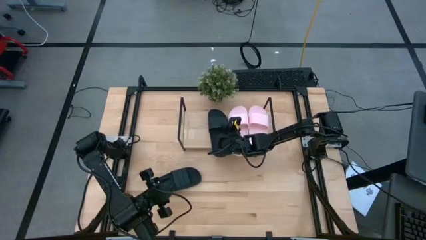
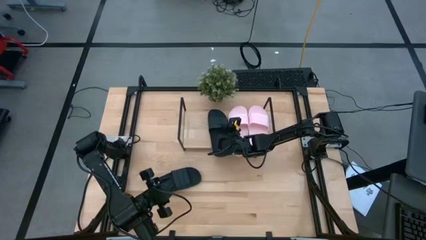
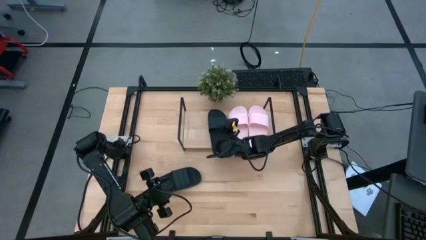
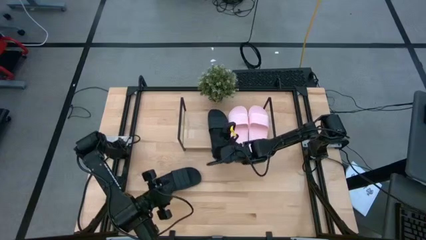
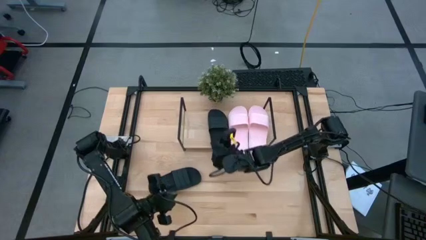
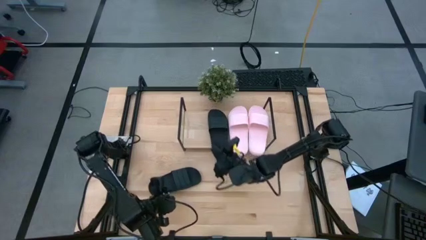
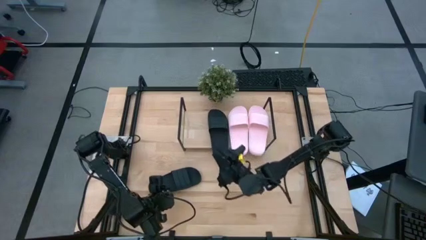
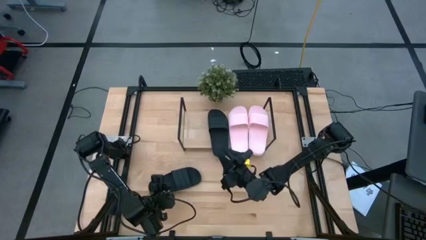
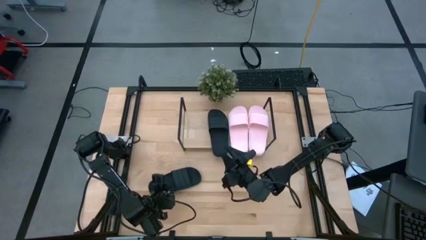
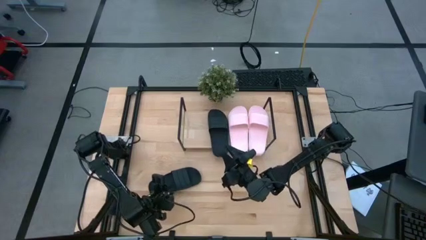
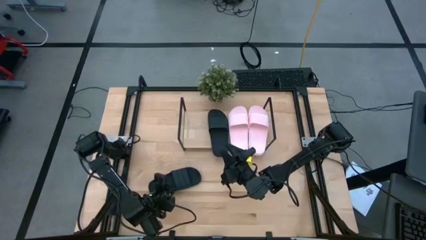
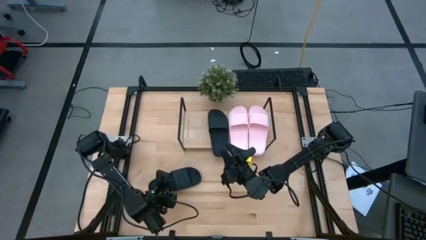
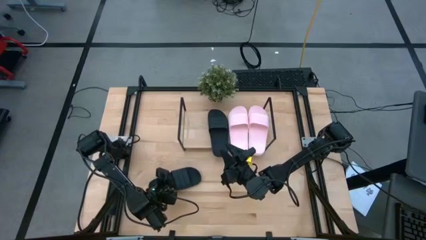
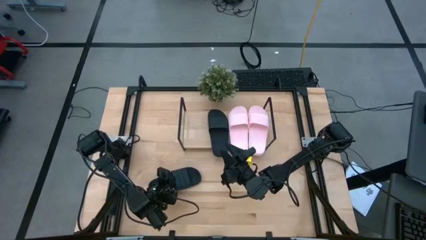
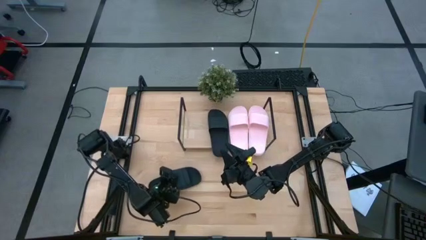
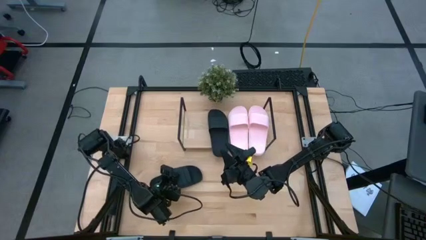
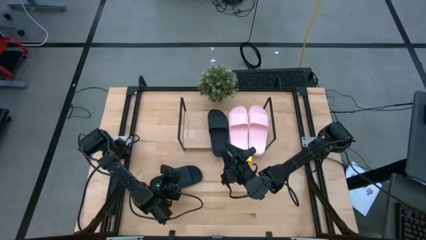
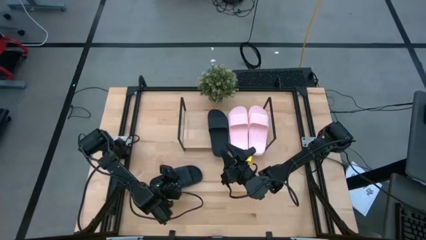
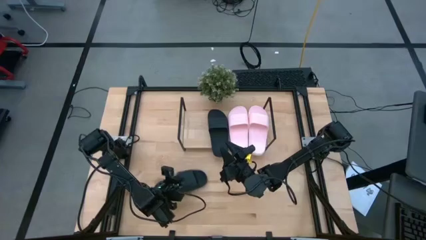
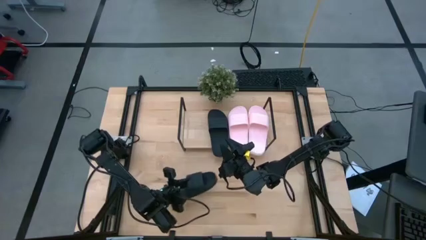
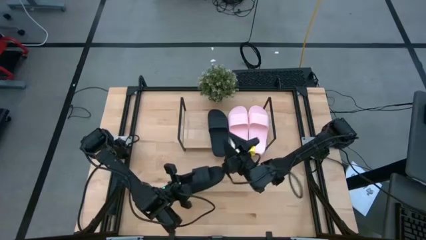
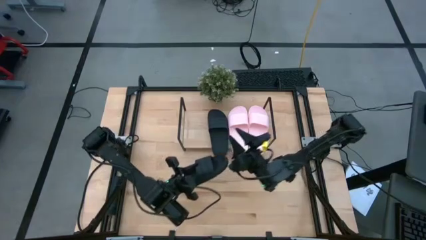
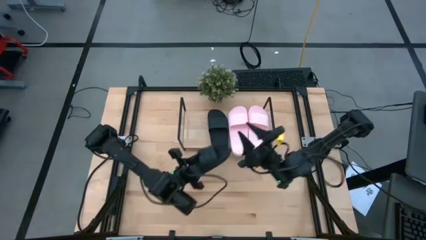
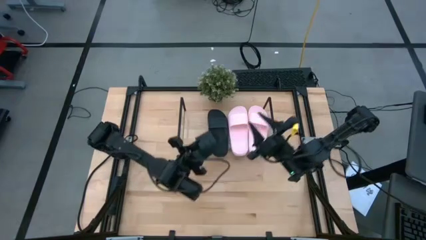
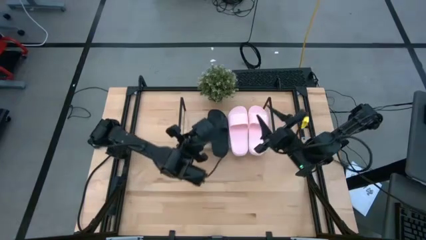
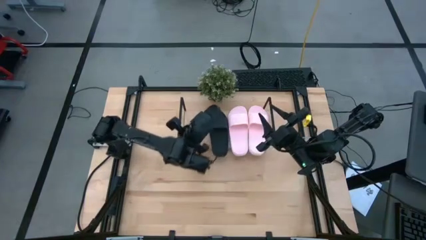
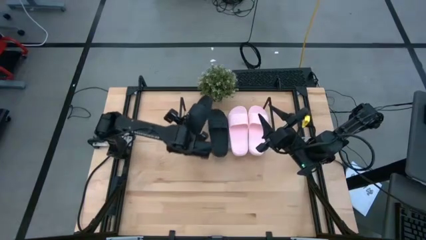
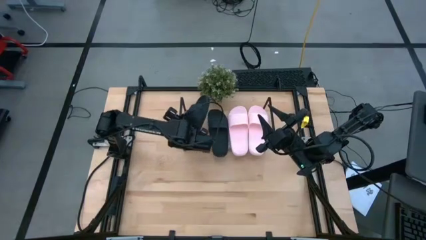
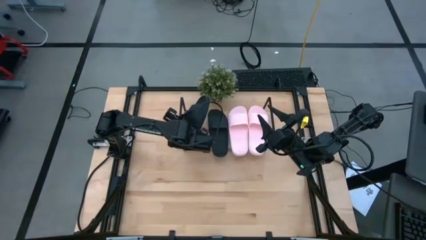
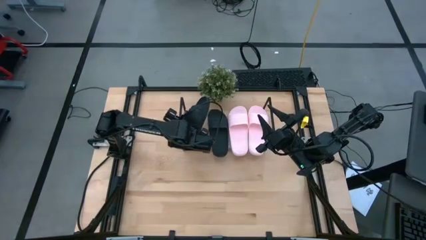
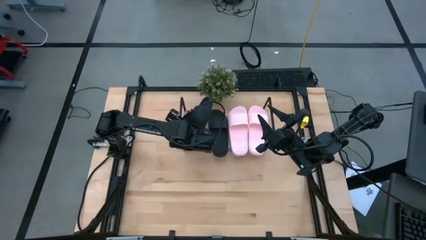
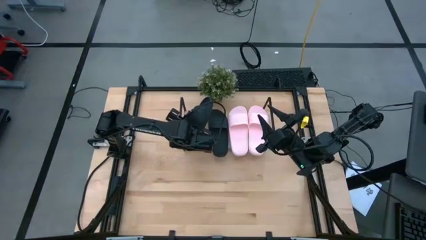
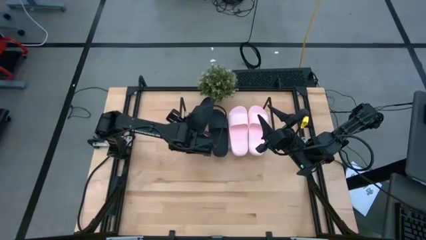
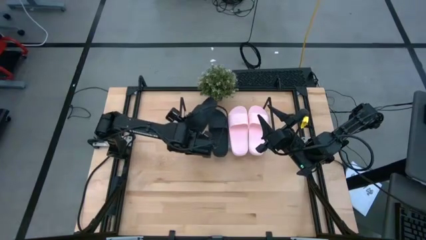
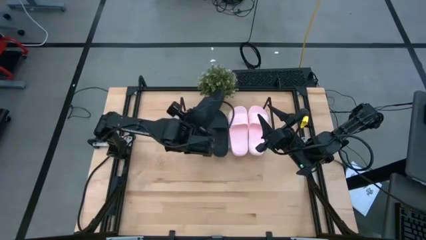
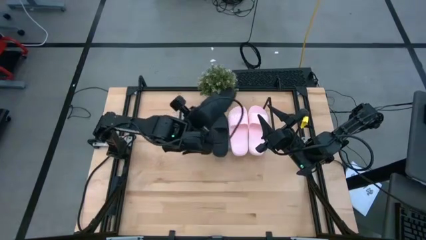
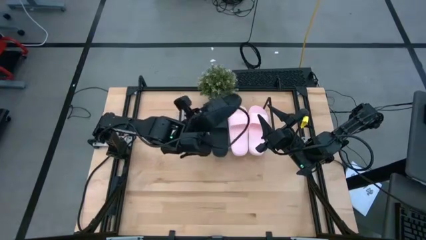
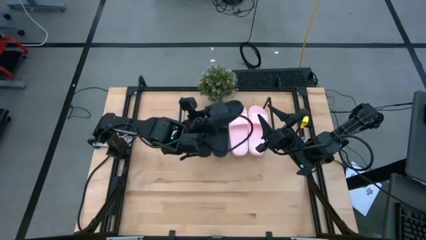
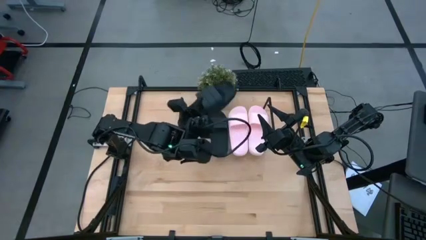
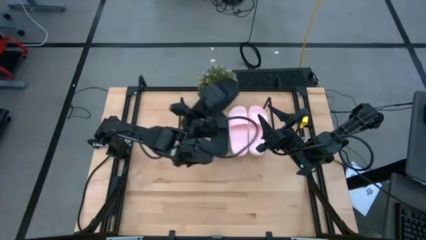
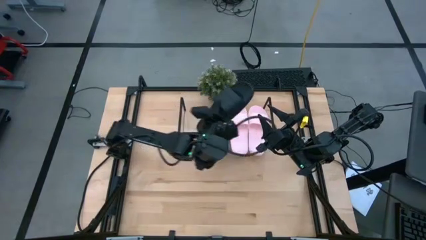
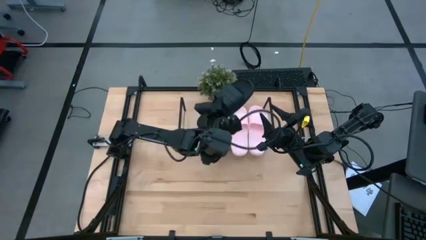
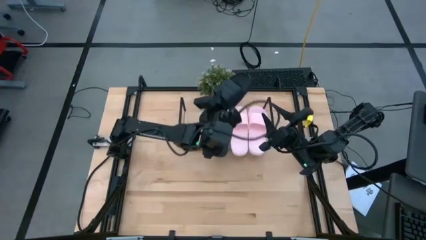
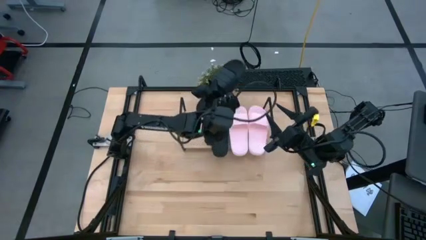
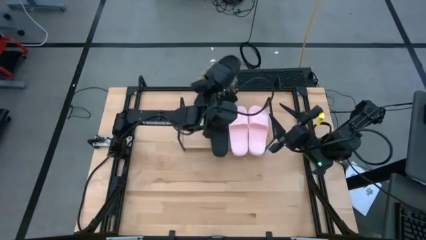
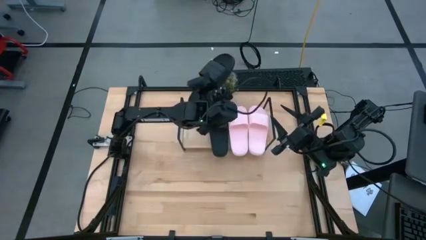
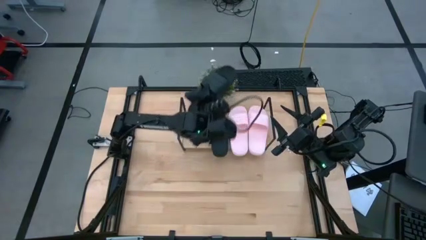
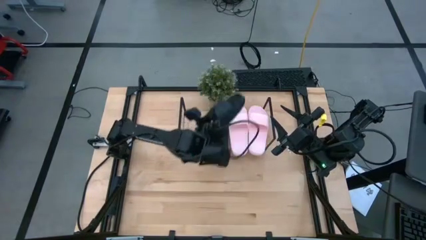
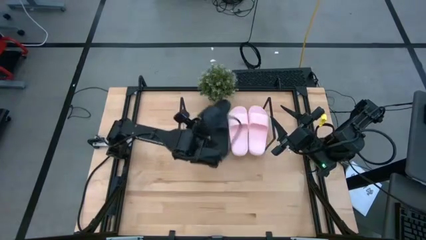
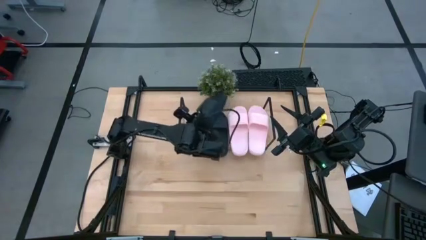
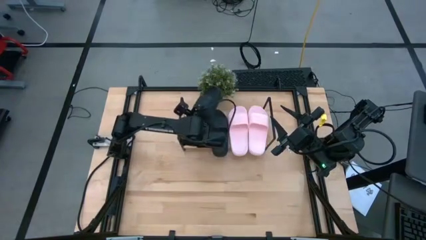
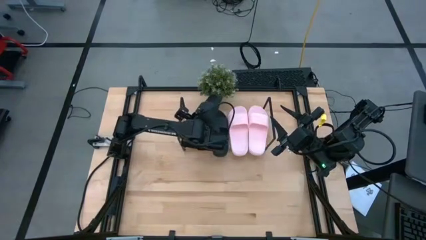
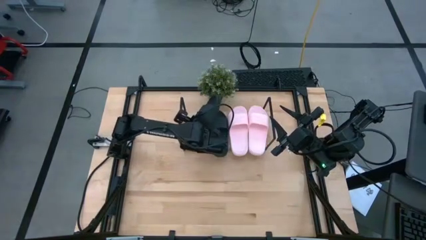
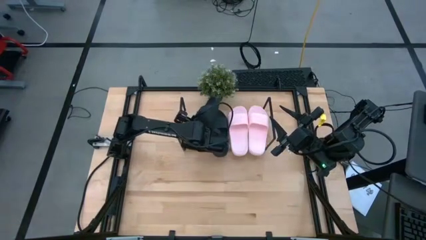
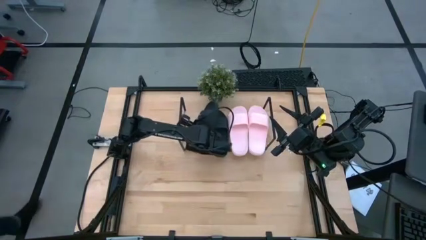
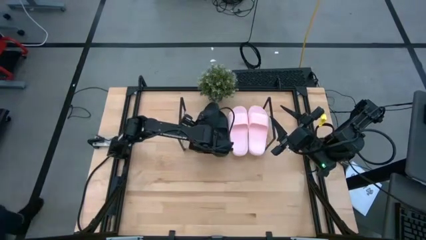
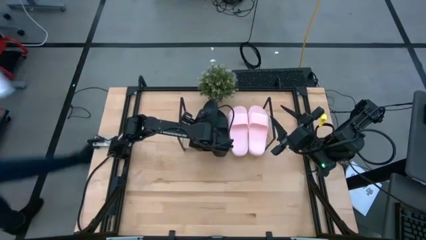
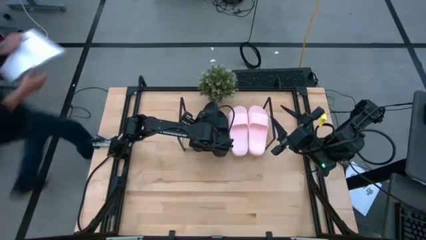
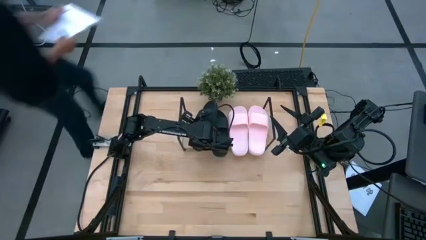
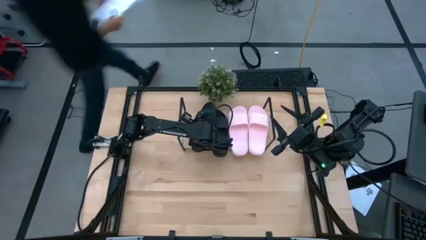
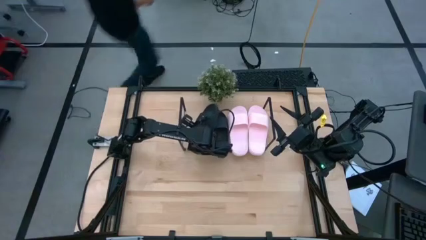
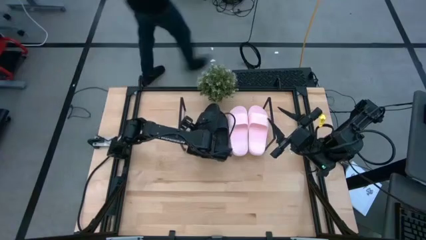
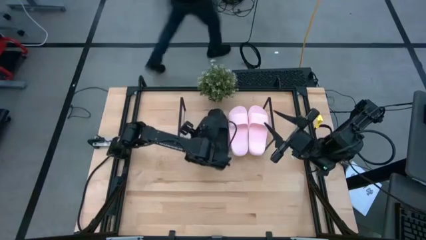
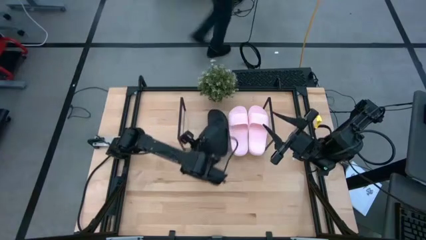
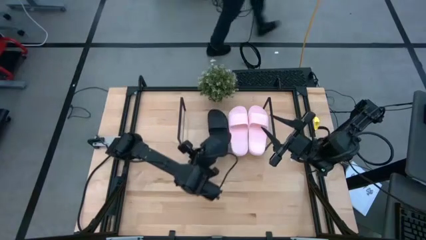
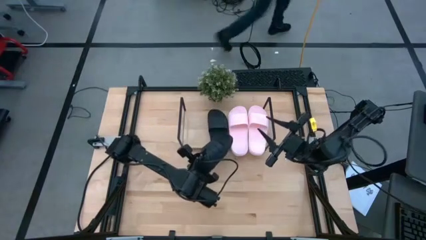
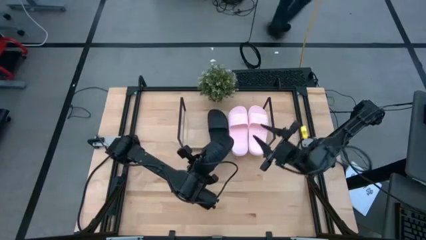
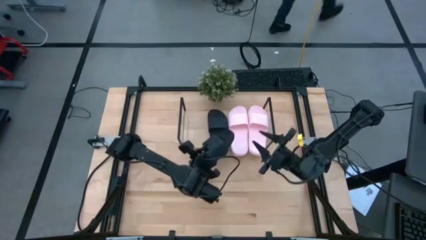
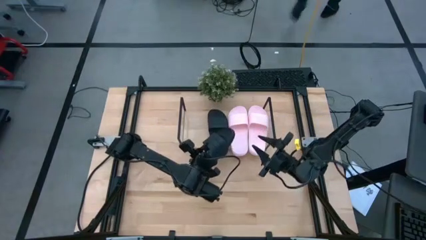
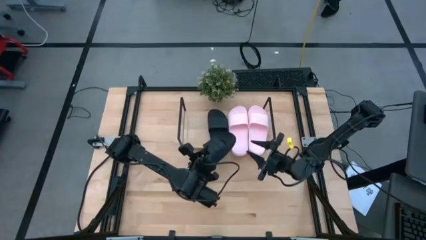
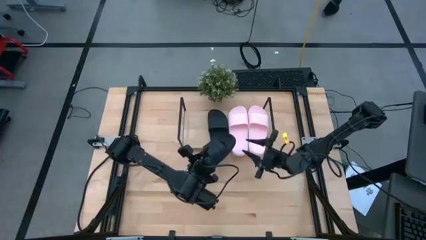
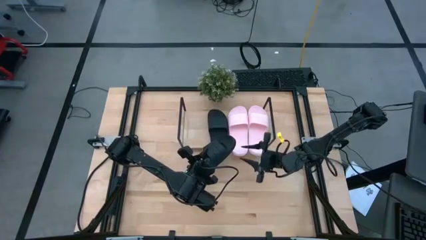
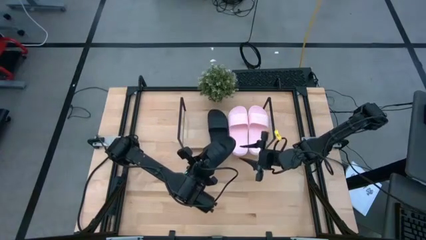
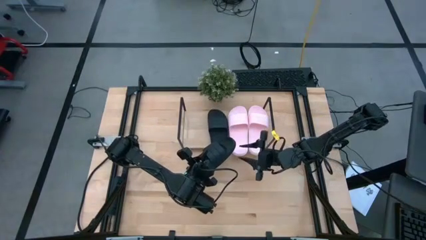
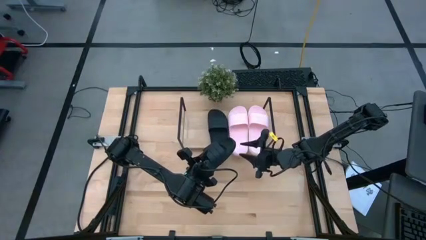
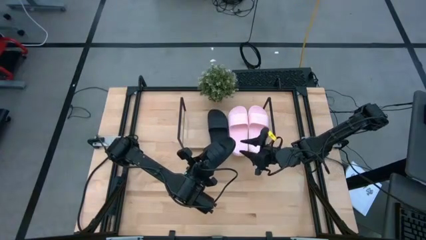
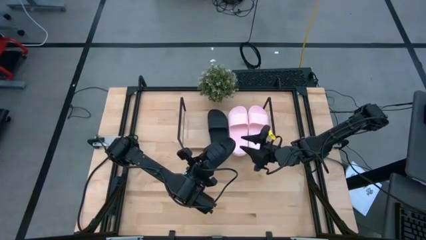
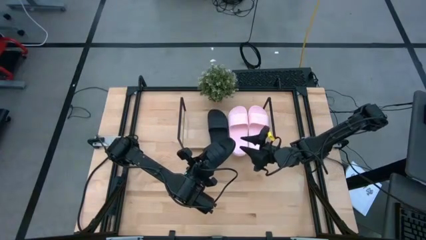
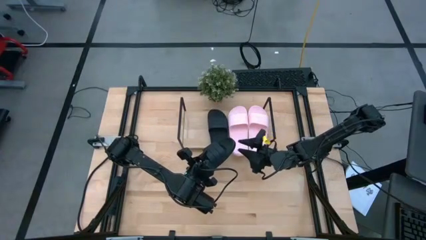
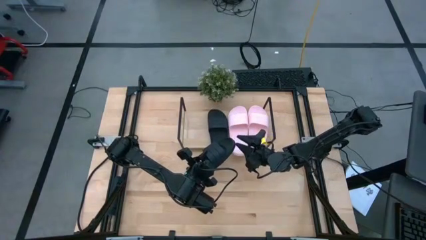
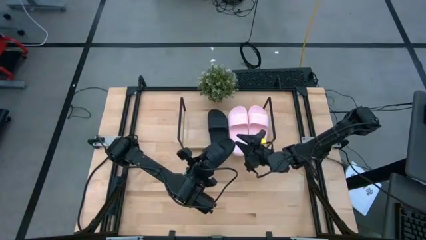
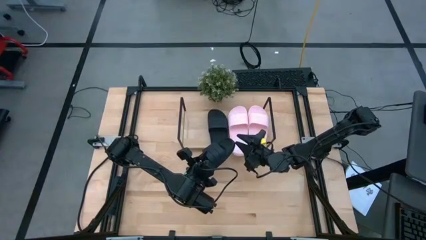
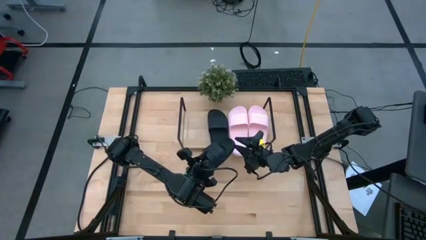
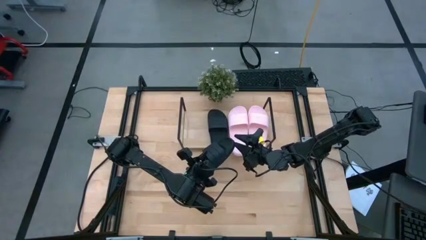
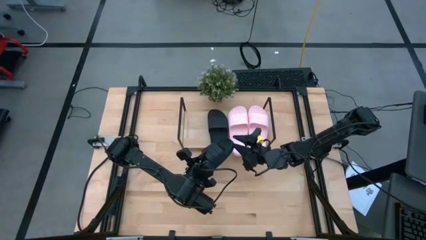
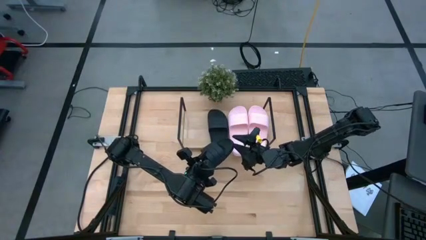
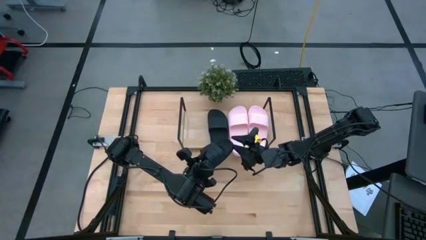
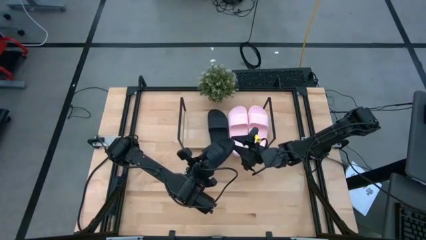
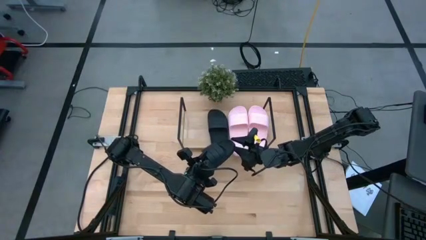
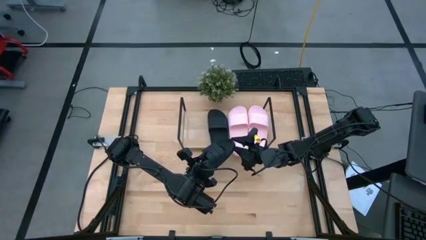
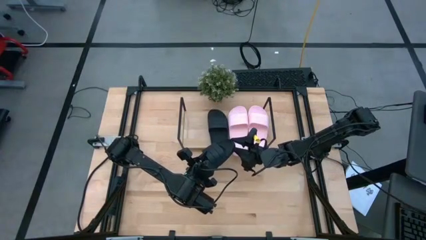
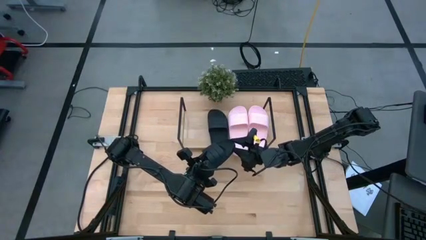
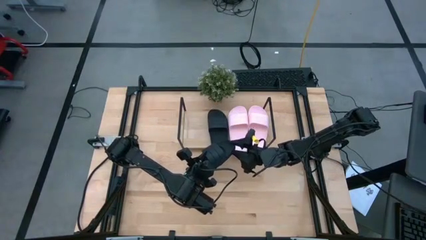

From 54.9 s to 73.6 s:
Task: Pick and place slides into the shelf
Put the black slides on the shelf
